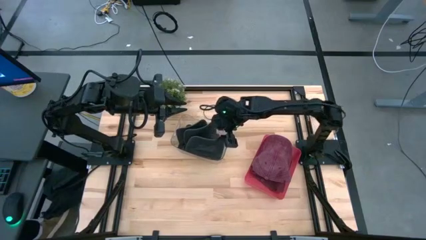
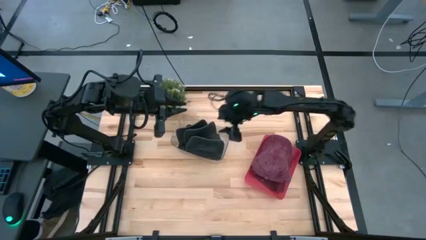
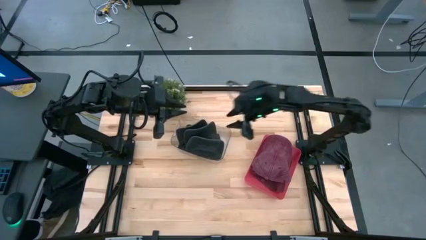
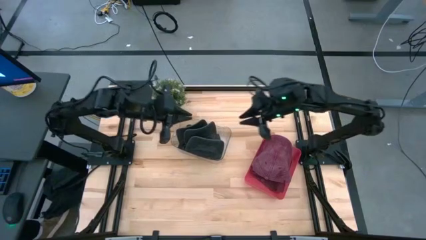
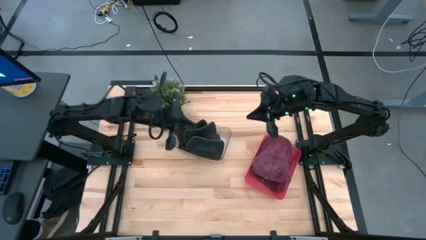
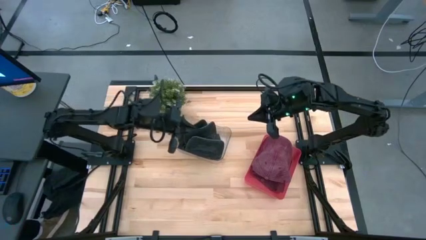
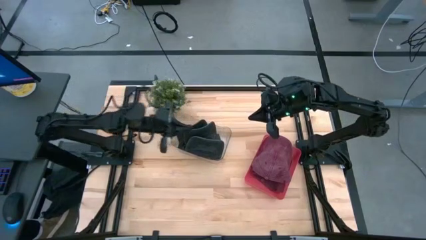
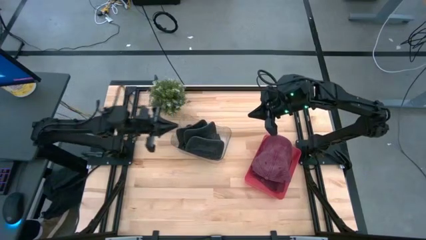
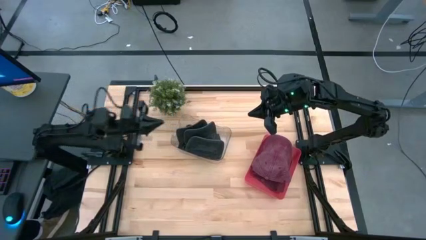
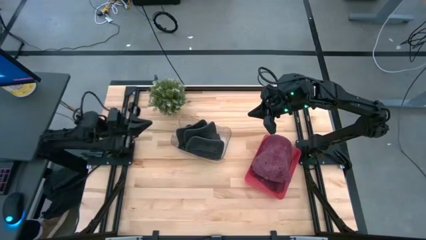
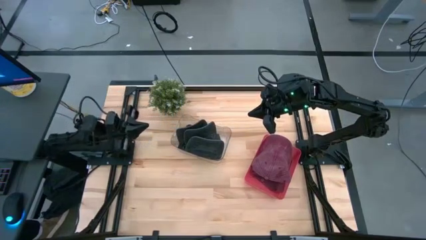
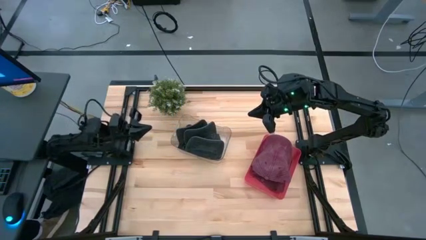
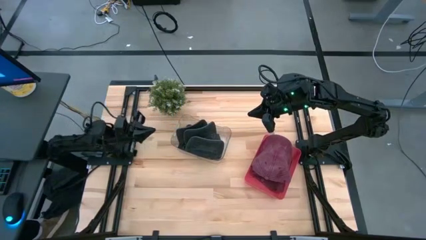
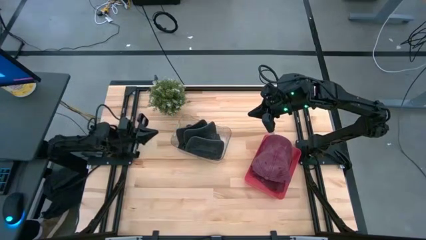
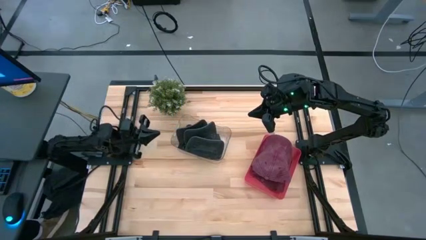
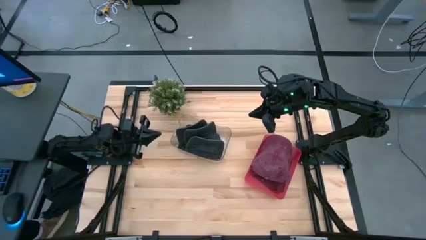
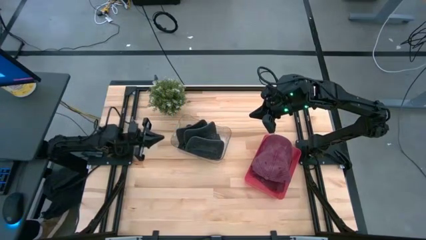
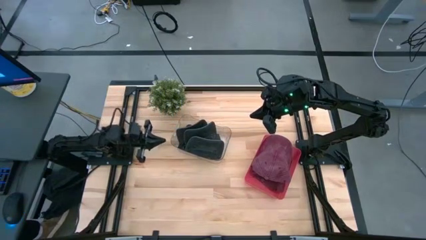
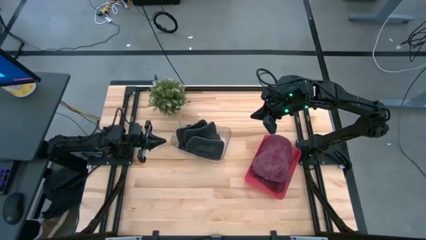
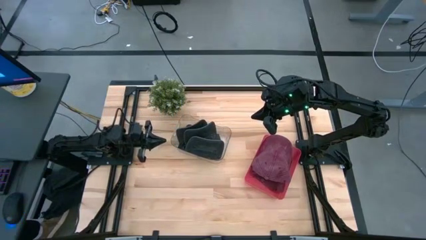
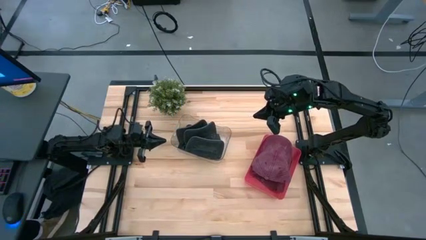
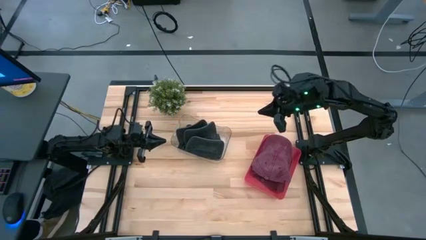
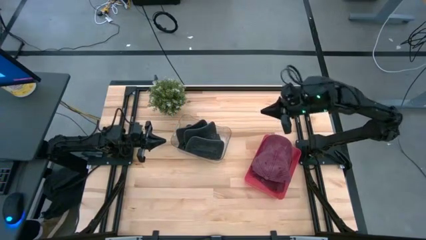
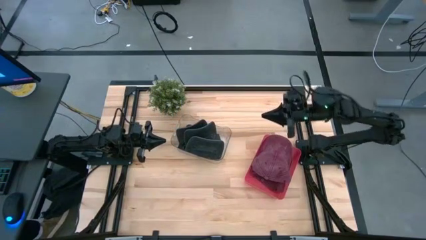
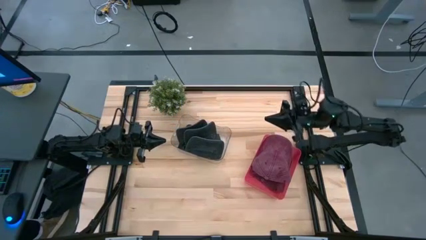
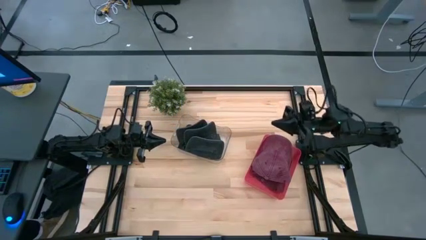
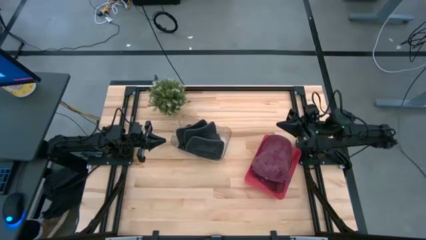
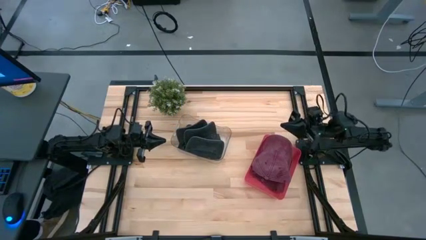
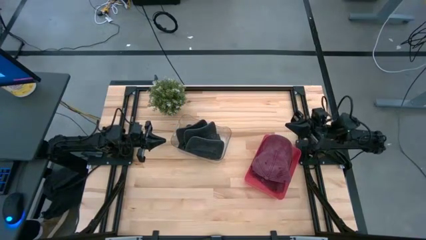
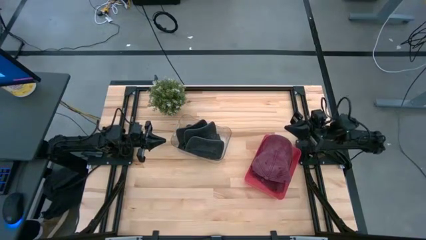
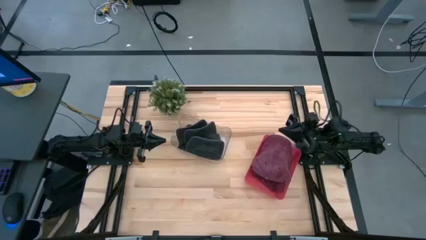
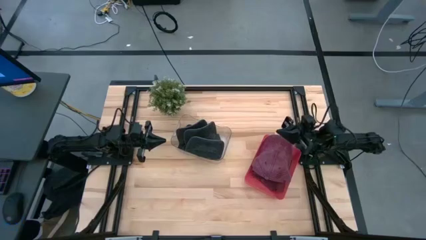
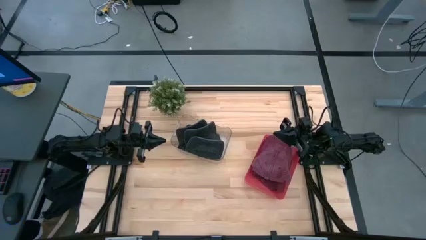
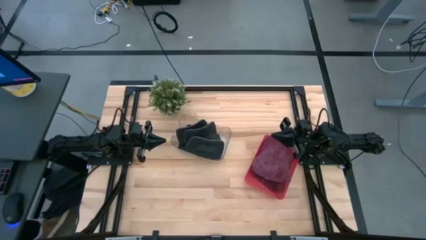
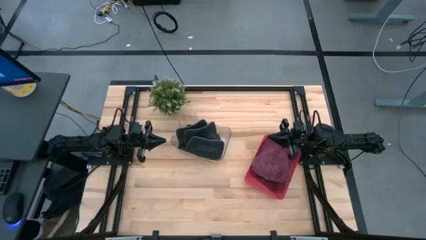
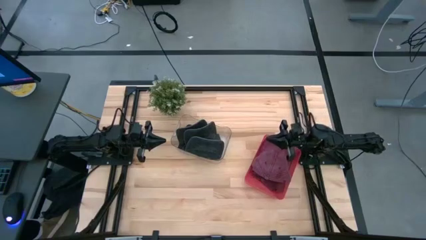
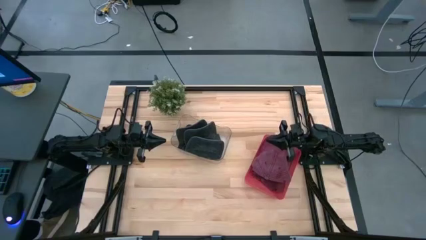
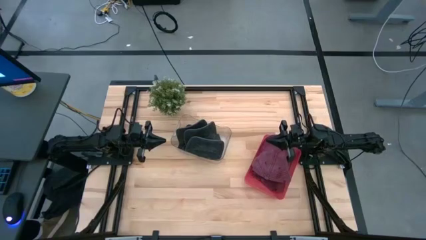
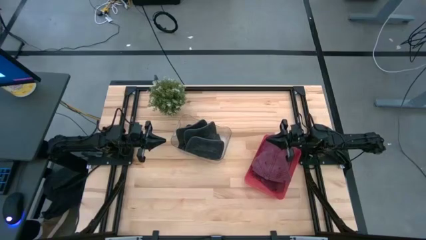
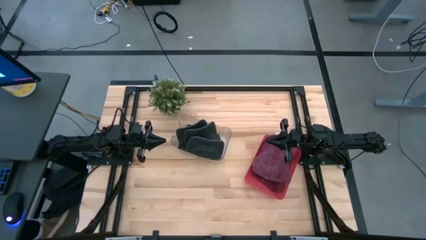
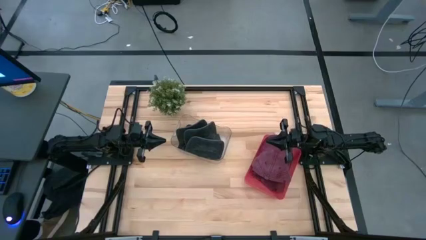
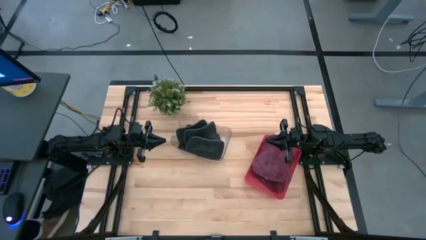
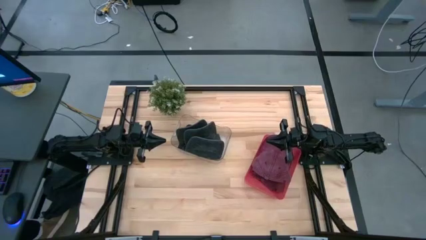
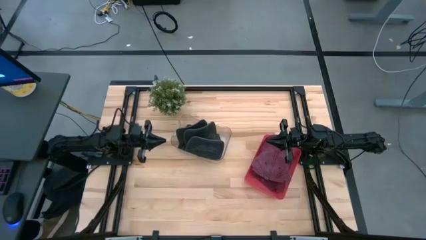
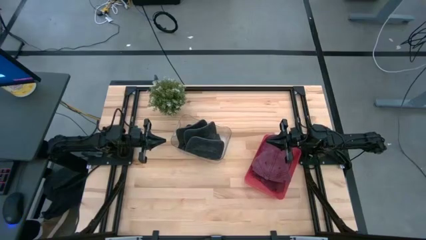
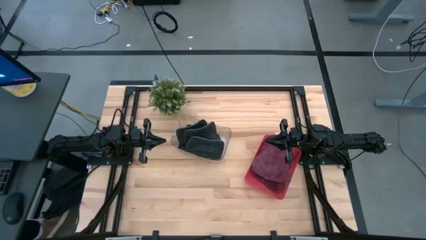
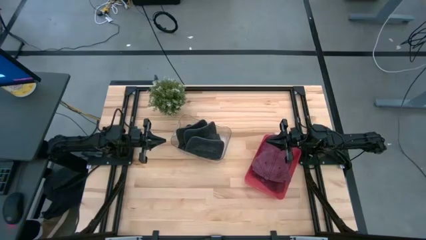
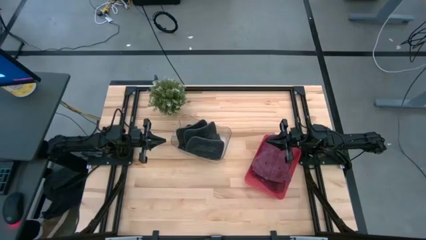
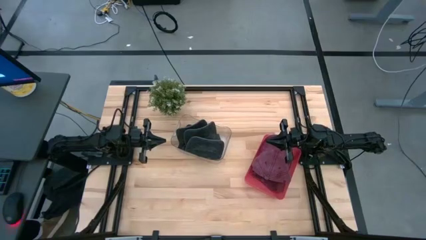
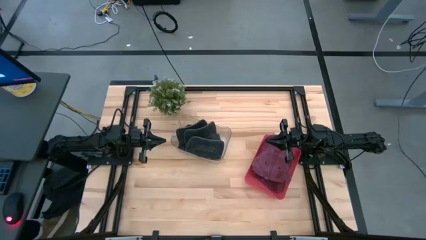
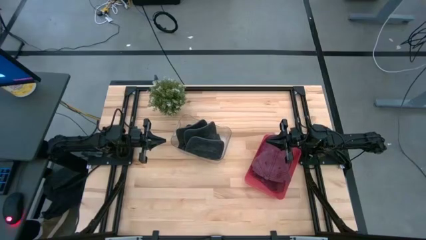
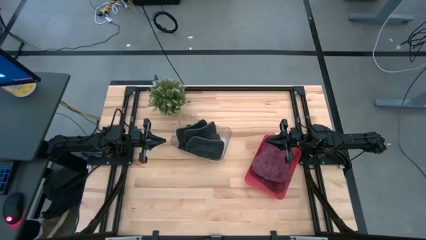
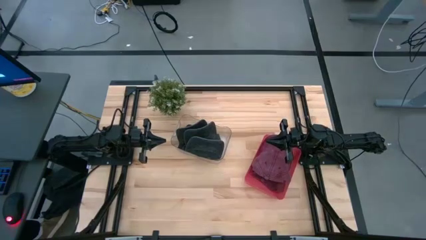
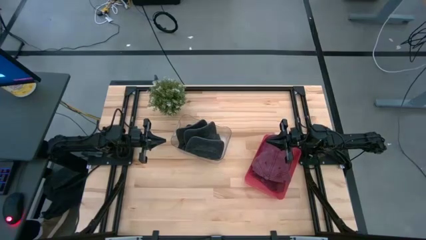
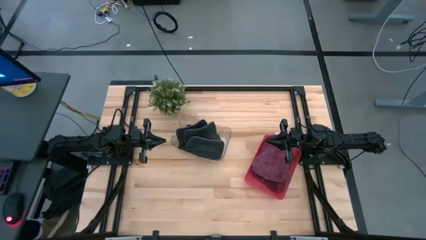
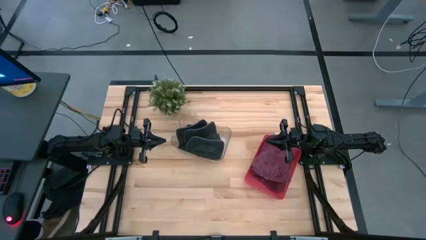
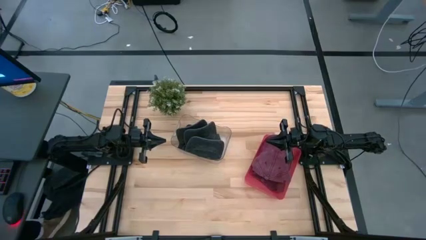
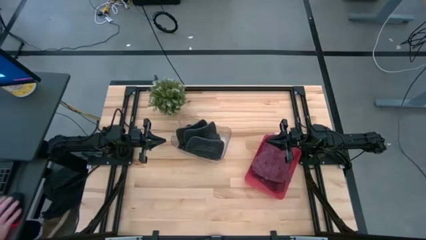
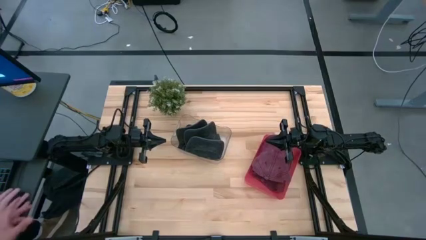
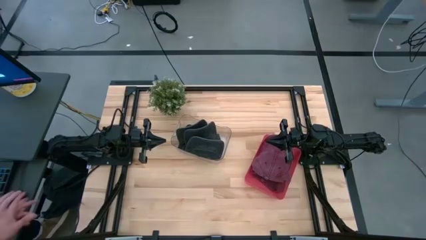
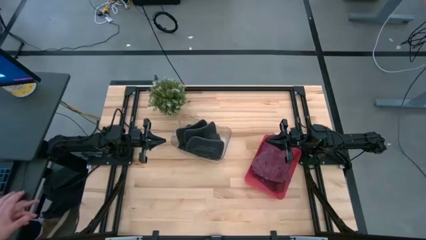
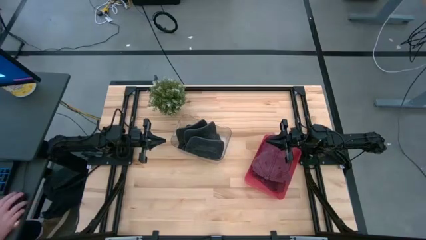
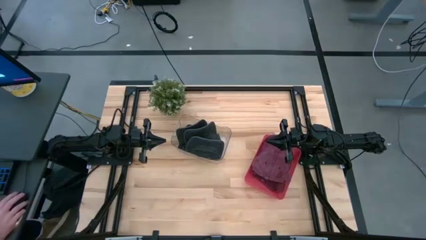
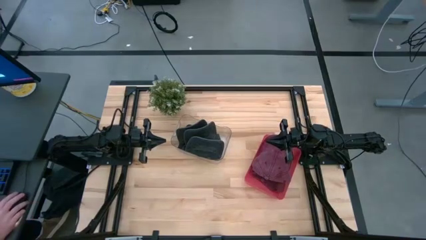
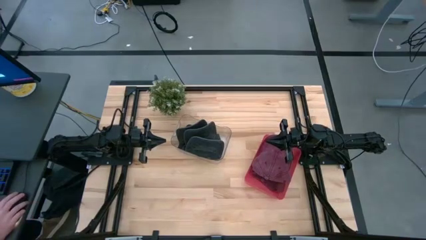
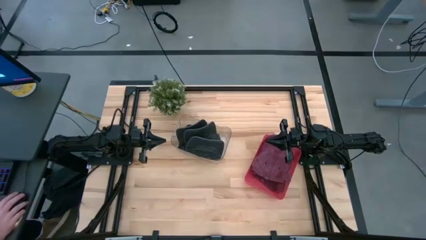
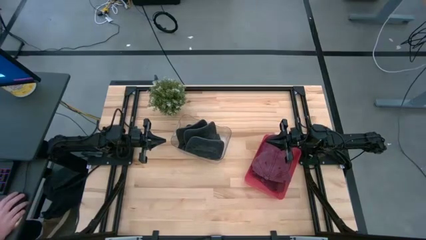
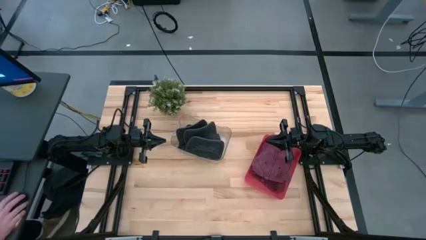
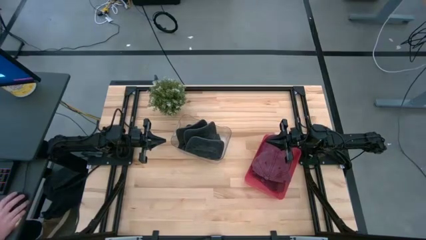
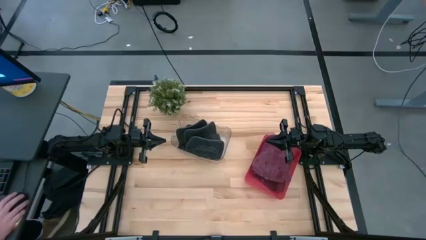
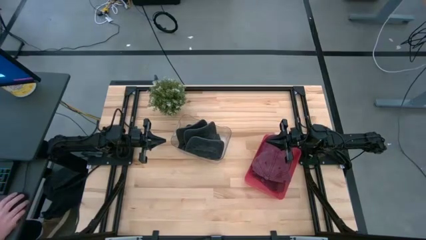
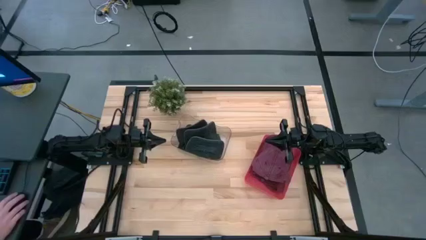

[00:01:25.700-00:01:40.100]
Task: Pick & Place hat
Return to Home Position

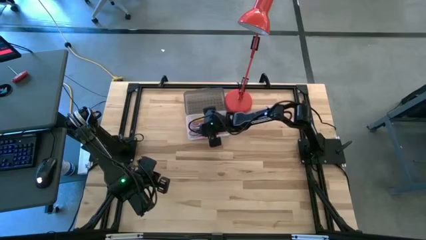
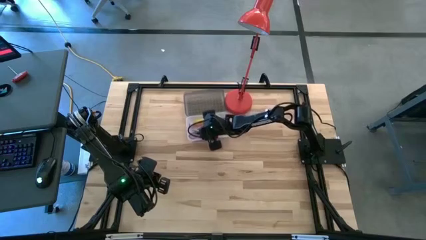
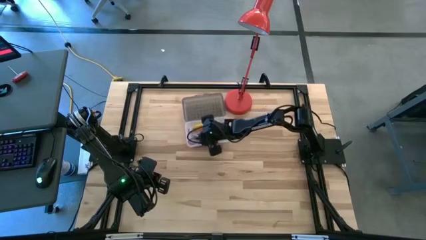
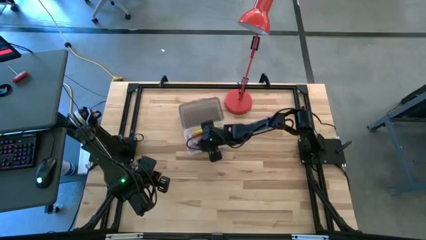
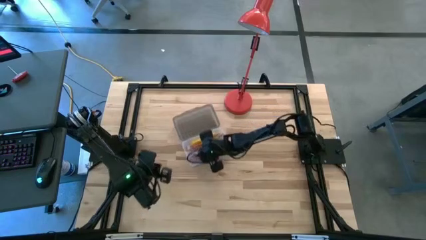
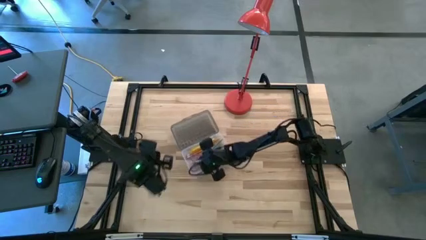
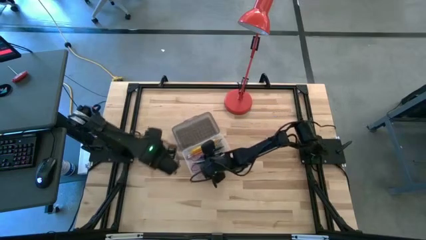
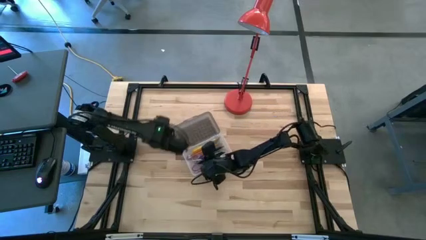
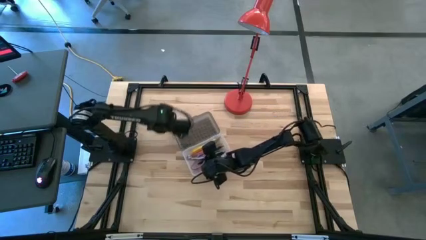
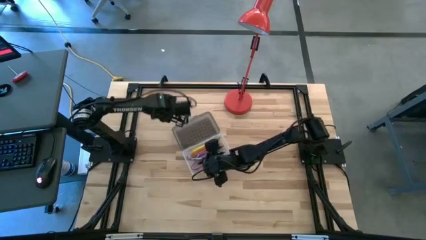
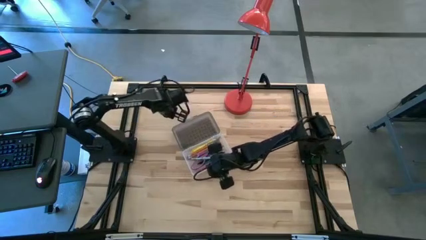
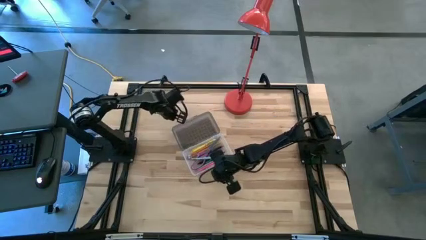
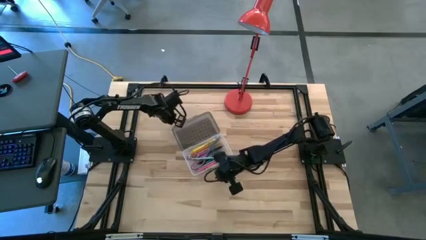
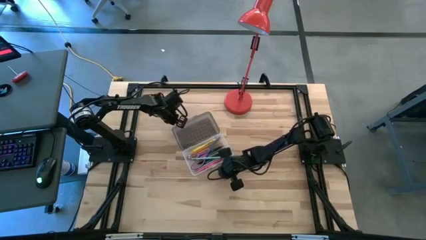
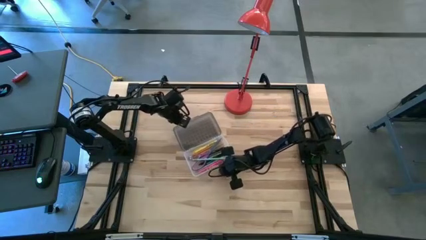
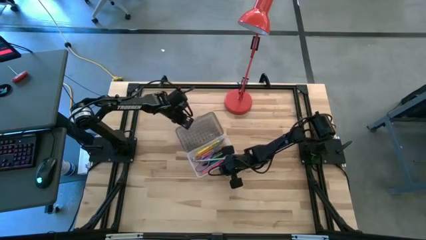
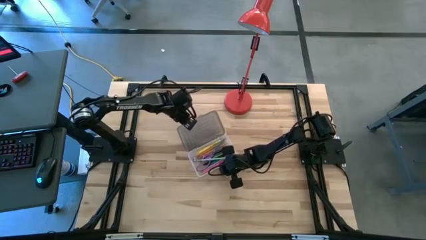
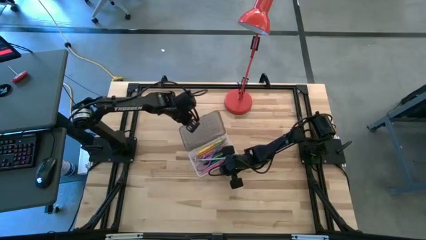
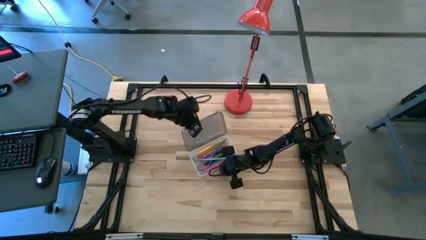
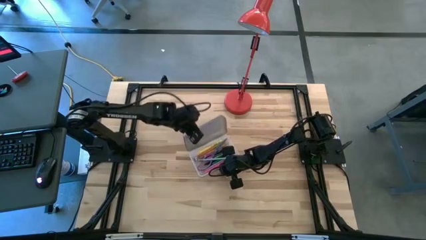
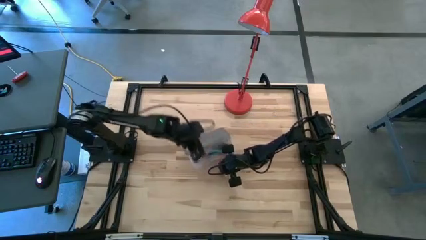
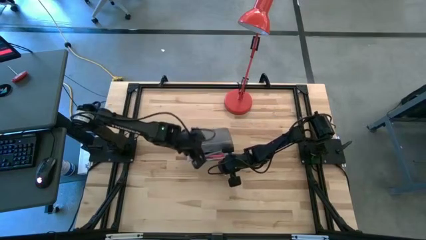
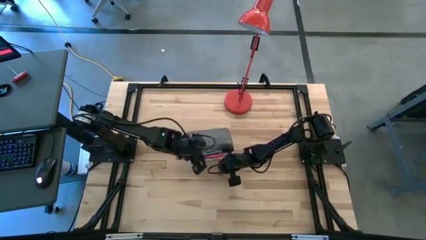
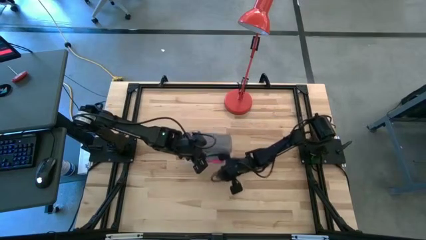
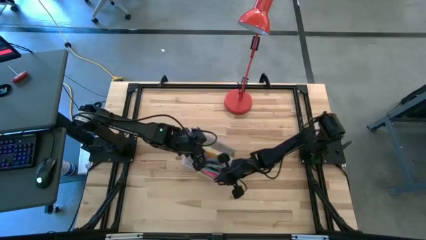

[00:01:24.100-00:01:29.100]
Task: Pick & place school supplies into a supply box
Close the black supply box
